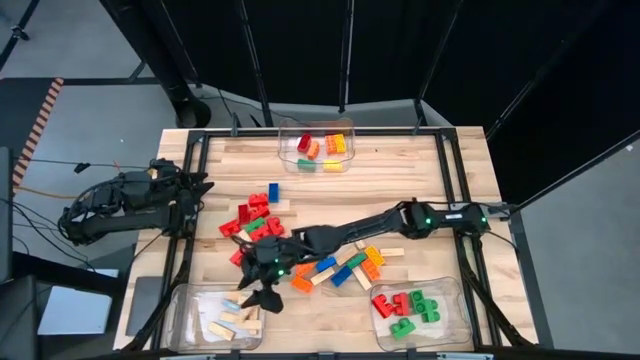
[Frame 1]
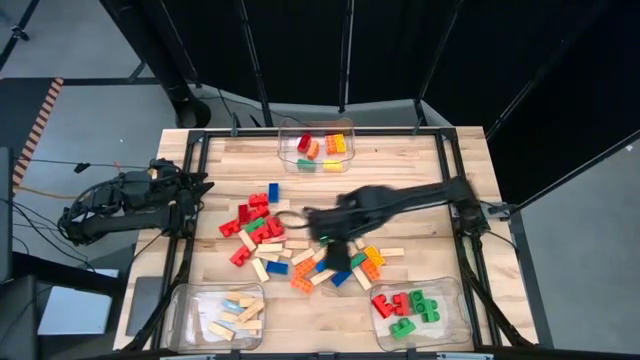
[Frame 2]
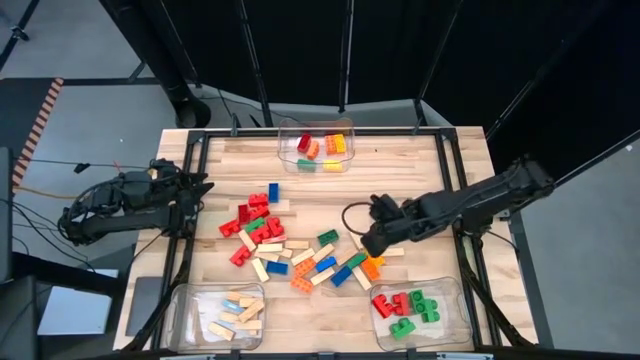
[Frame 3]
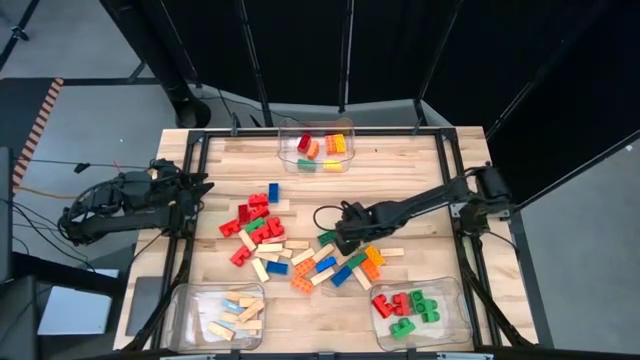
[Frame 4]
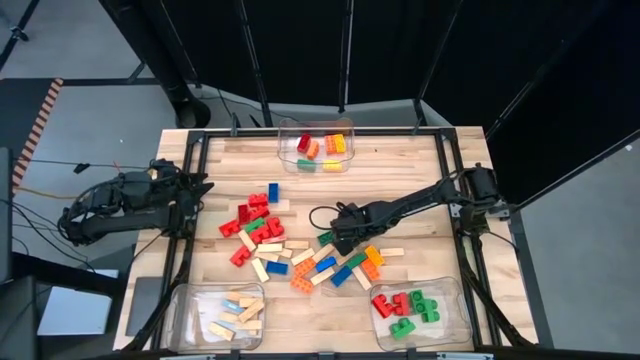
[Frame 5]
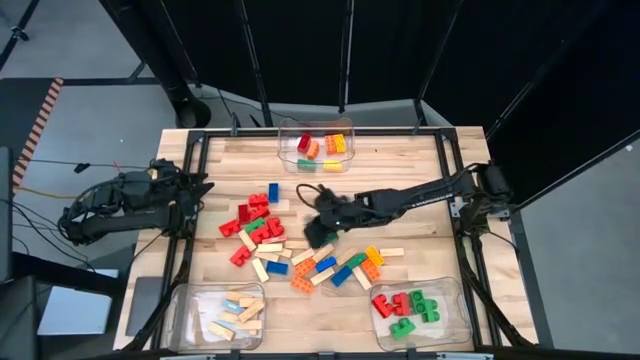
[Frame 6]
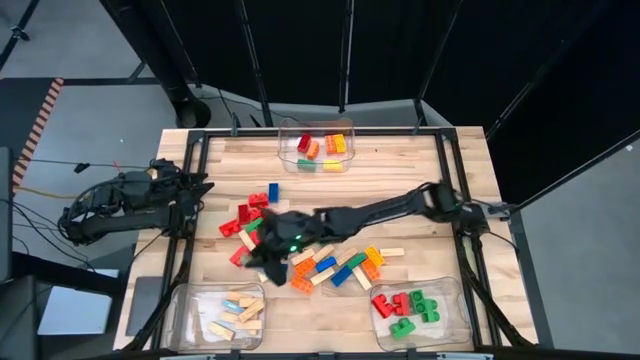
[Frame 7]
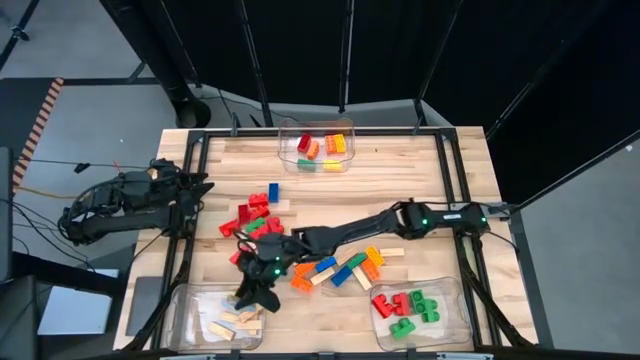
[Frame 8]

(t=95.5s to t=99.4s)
Task: Sort blocks by size
Put the white block into the bottom left transparent bin

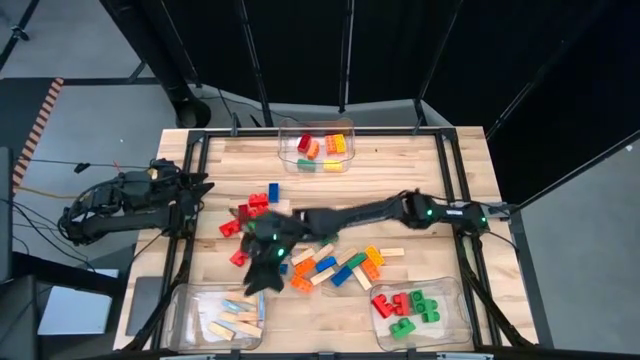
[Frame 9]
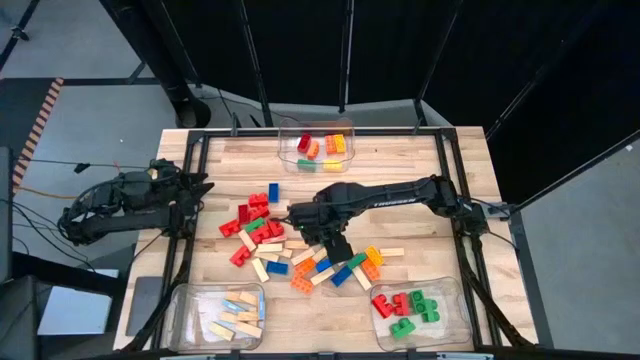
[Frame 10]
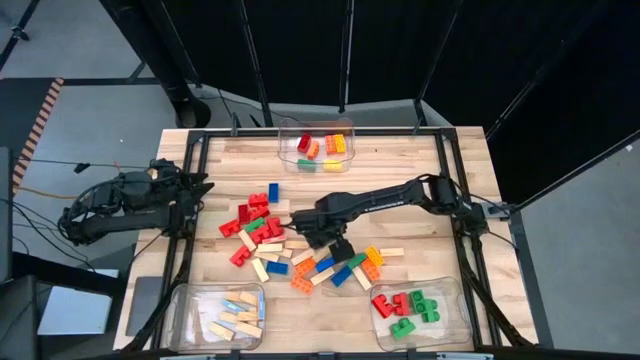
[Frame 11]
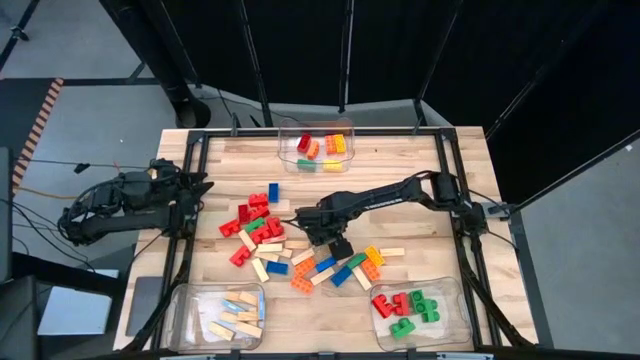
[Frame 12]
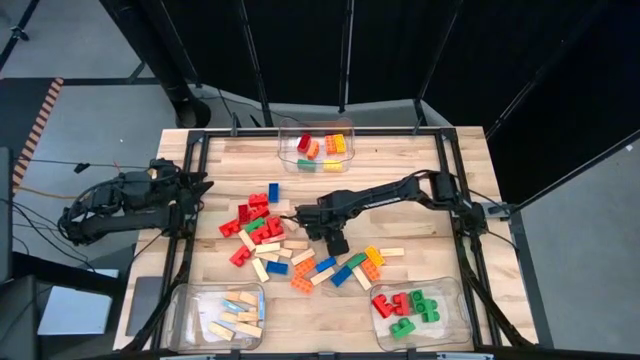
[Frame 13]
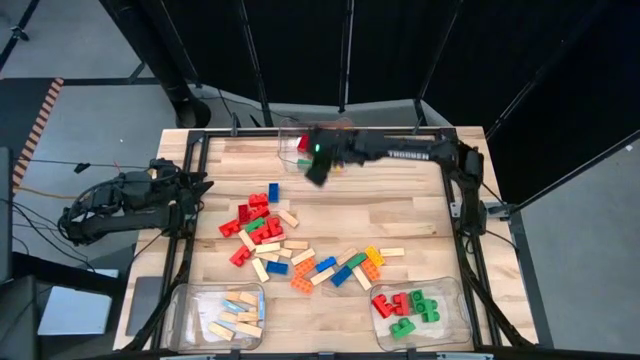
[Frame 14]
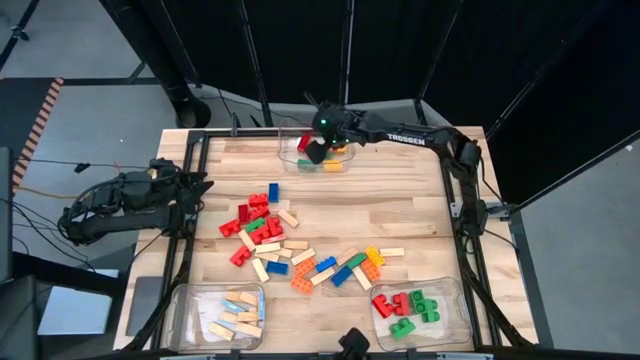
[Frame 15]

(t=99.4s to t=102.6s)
Put the 3-stud green game piece into the top center transparent bin

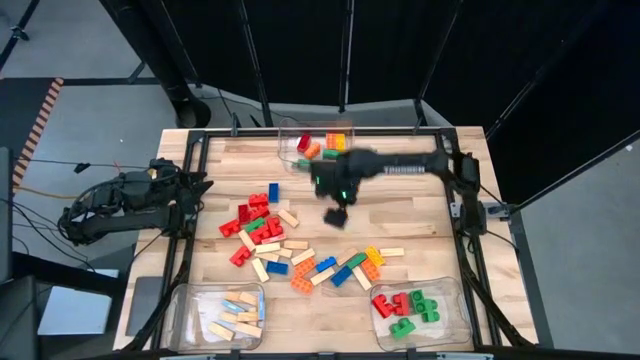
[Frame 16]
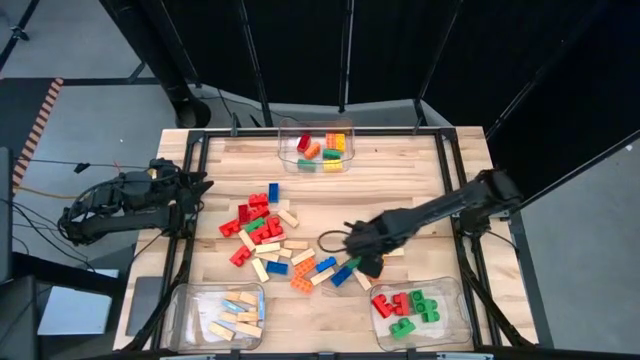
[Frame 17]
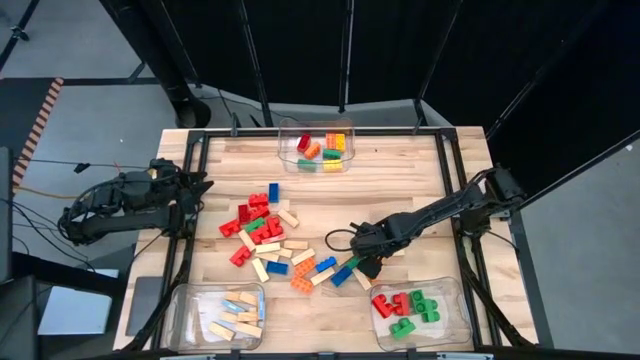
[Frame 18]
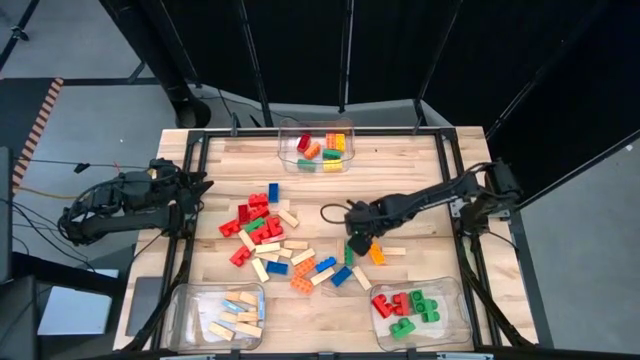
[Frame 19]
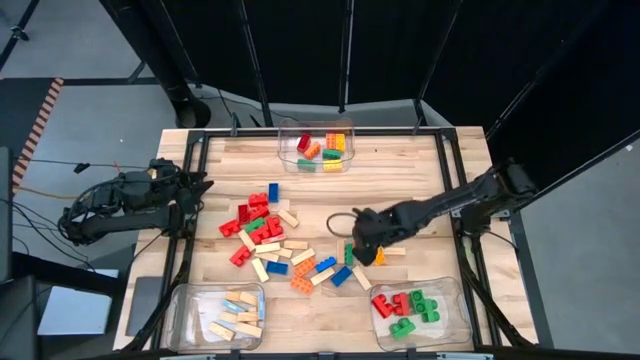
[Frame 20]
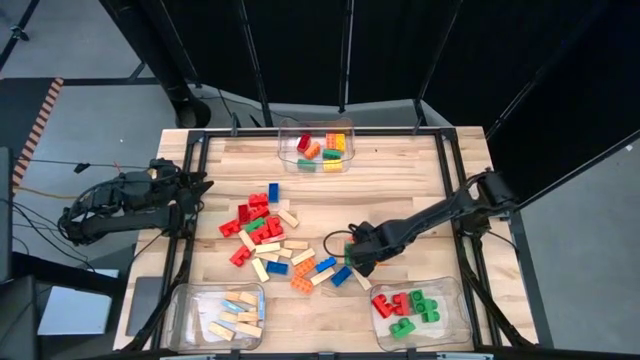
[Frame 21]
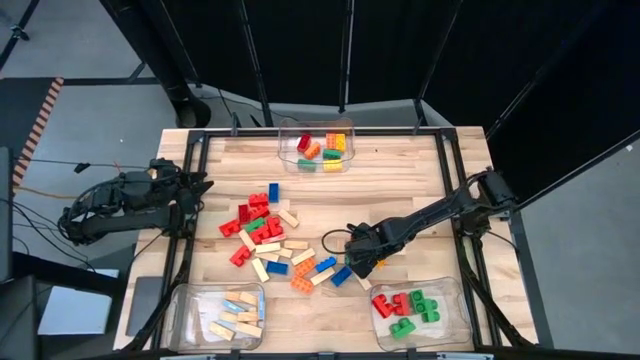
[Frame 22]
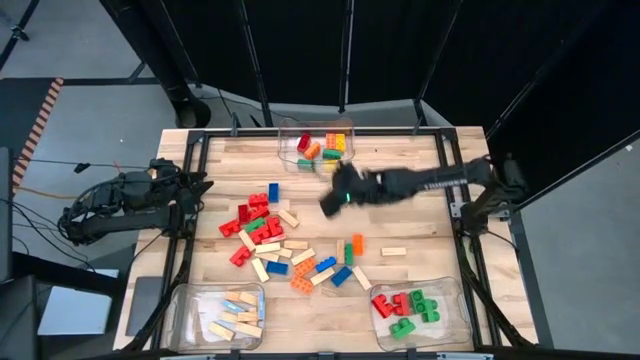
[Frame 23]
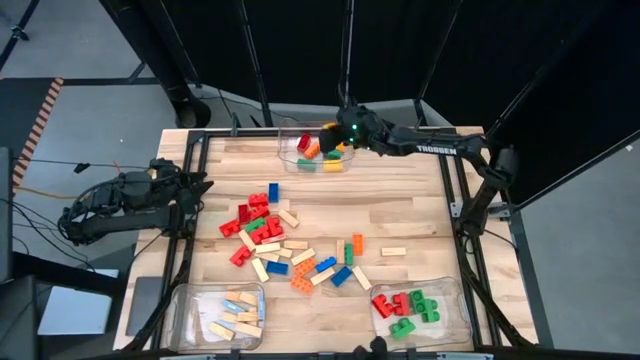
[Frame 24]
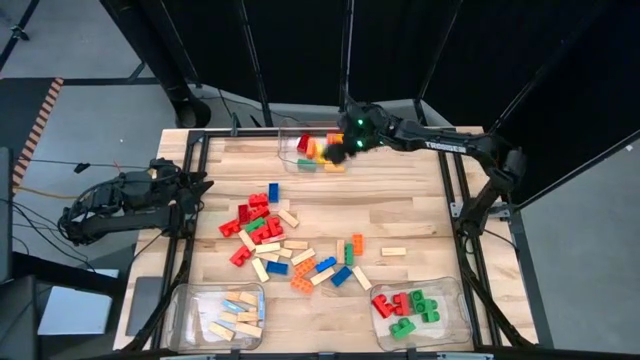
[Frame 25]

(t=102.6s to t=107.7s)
Put the 3-stud yellow game piece into the top center transparent bin

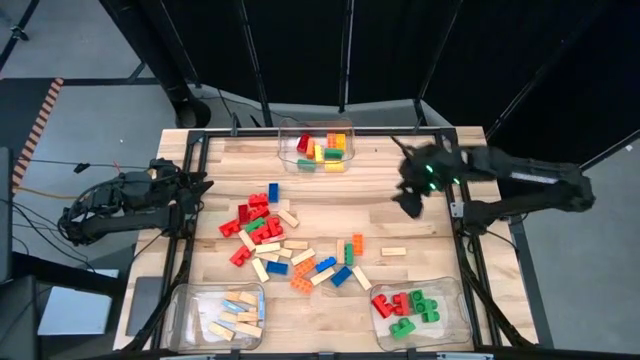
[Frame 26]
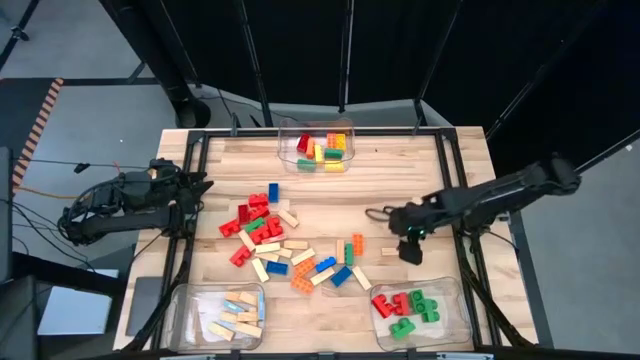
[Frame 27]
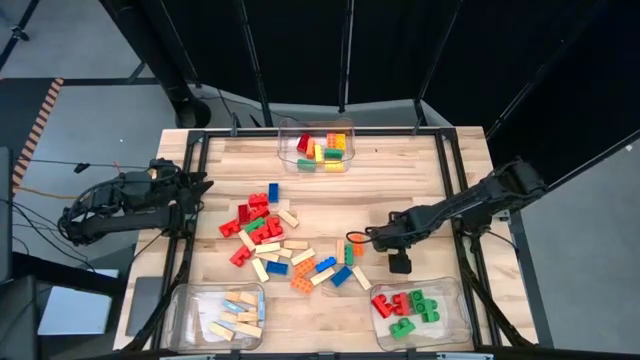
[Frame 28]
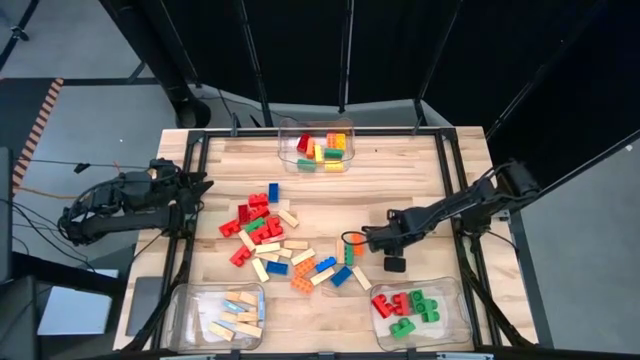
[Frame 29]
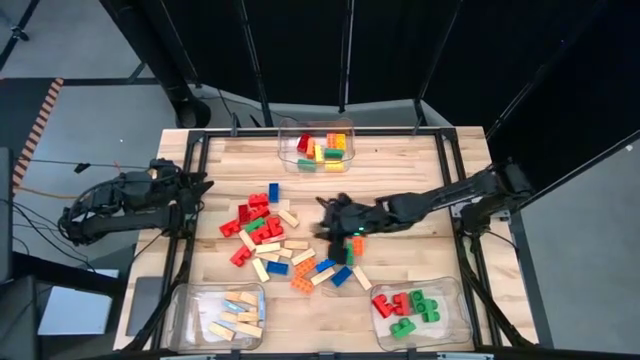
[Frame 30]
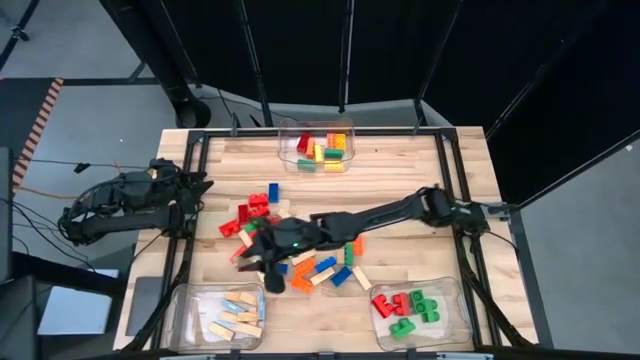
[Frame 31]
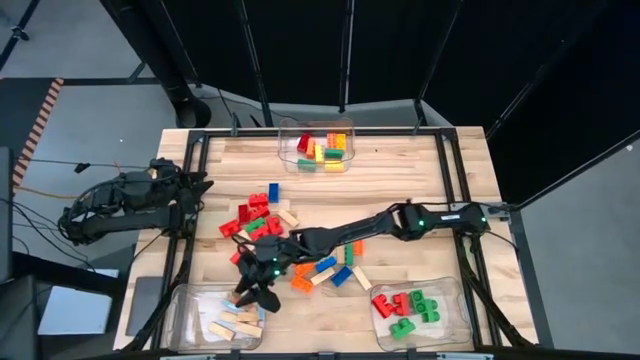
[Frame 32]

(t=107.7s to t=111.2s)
Put the white block into the bottom left transparent bin

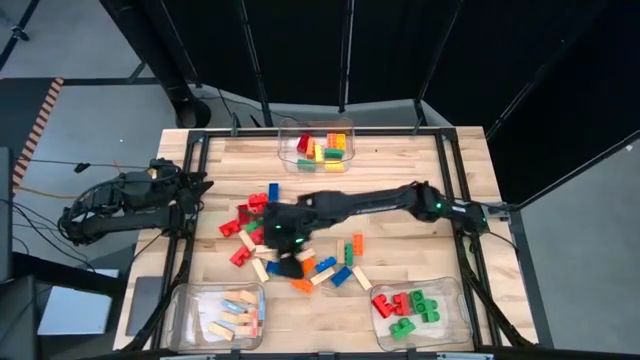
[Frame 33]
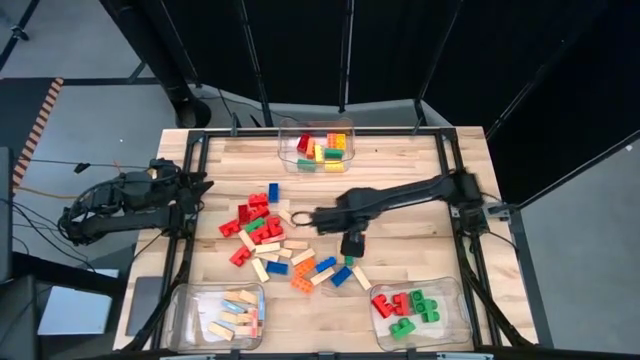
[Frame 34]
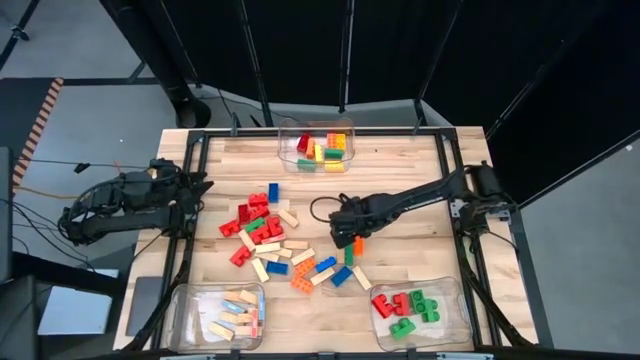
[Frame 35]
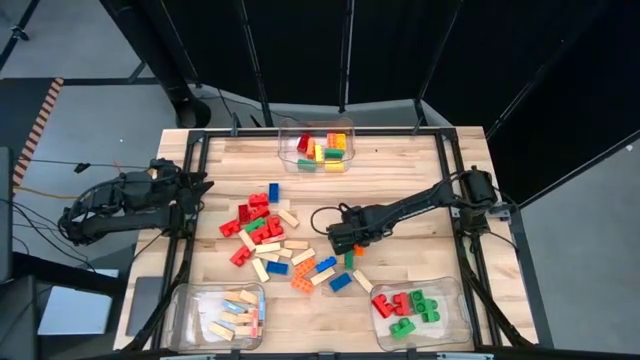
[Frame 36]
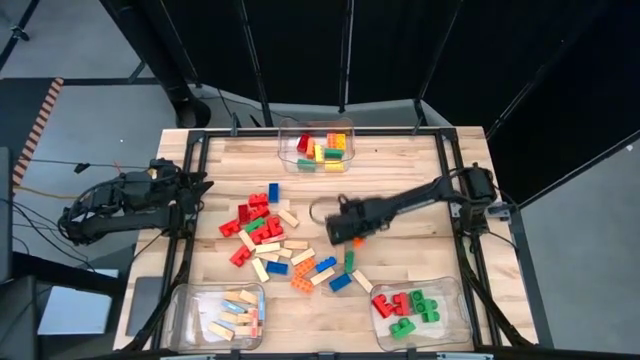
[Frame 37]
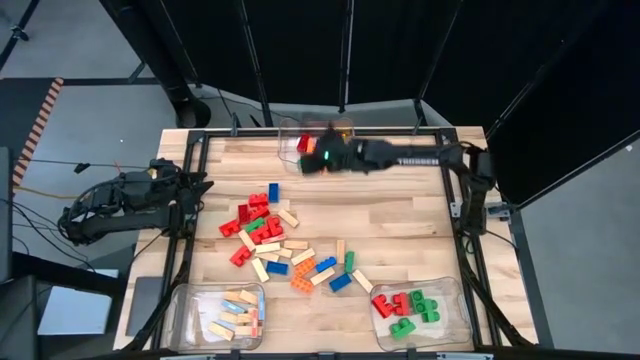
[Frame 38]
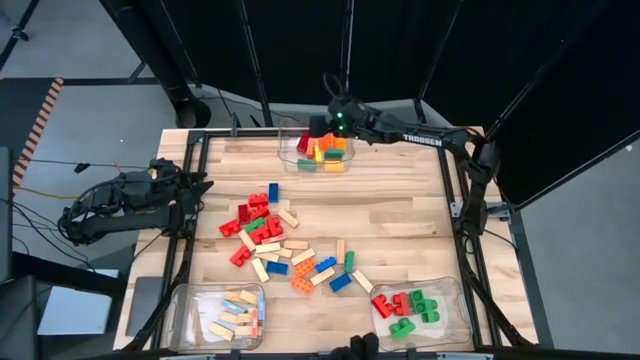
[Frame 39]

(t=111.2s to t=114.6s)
Put the 8-stud orange game piece into the top center transparent bin

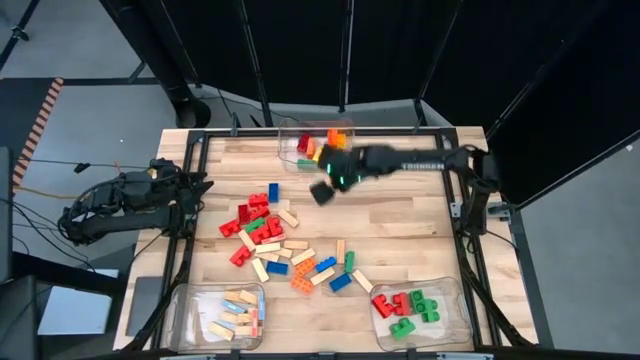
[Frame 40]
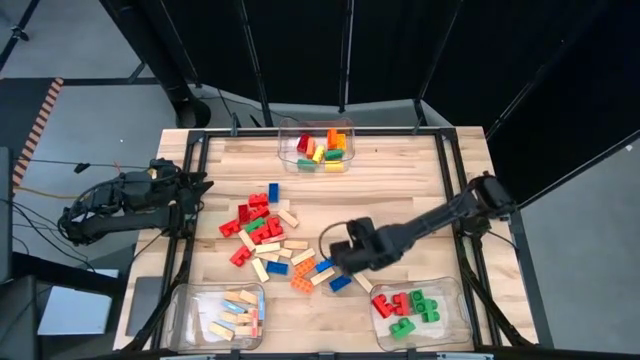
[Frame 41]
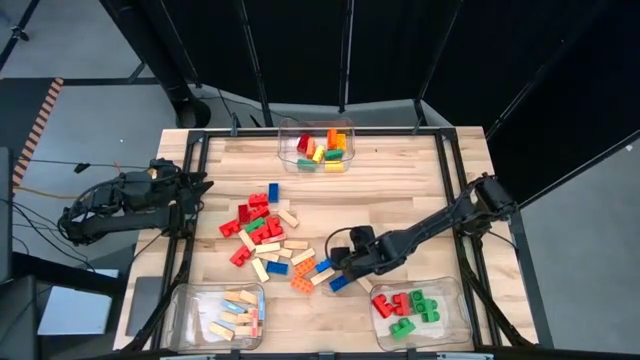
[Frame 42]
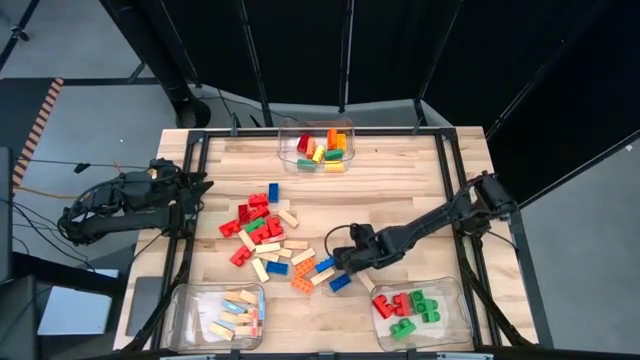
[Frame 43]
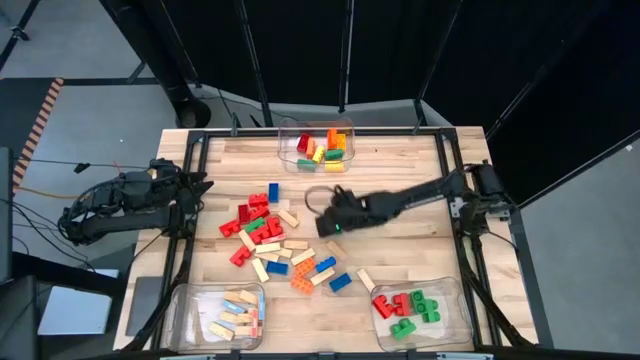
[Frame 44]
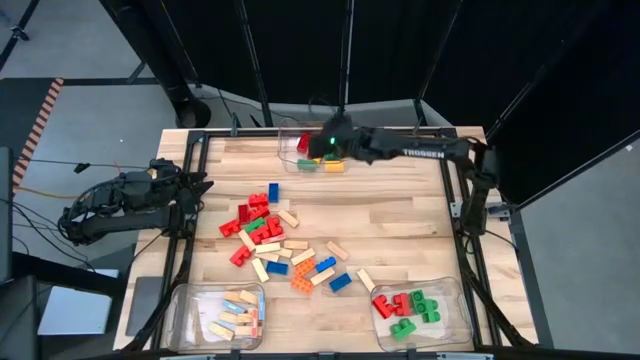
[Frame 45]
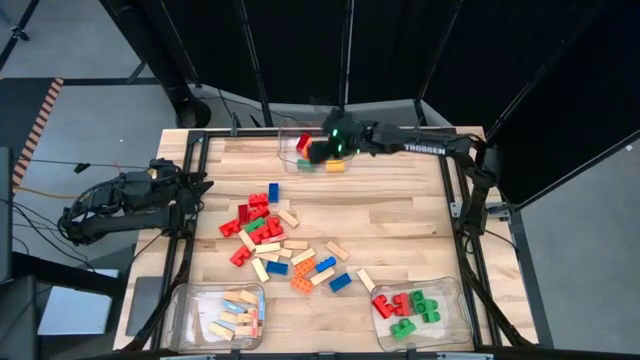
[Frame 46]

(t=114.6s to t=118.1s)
Put the 4-stud green game piece into the top center transparent bin
